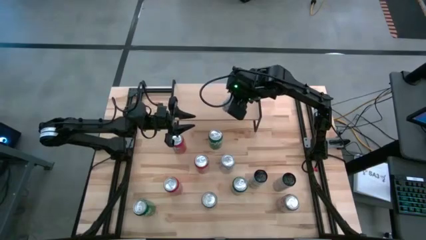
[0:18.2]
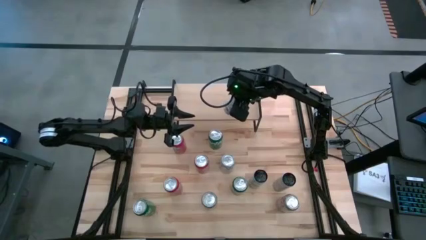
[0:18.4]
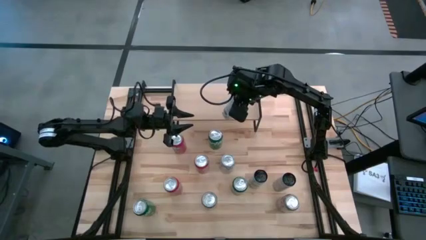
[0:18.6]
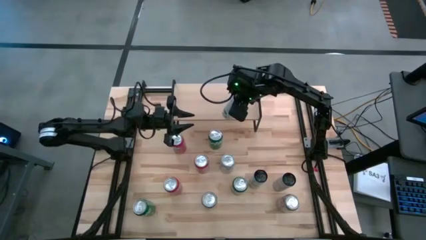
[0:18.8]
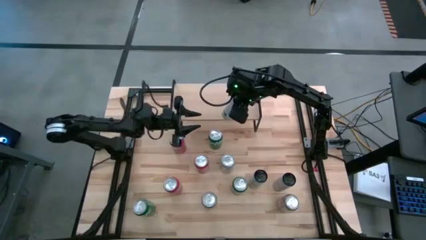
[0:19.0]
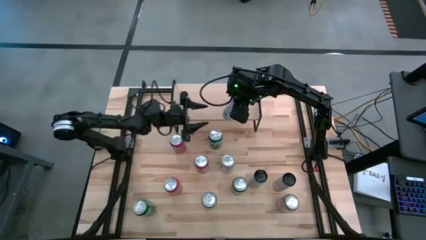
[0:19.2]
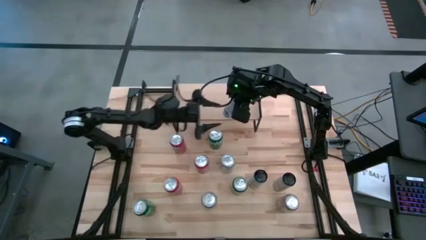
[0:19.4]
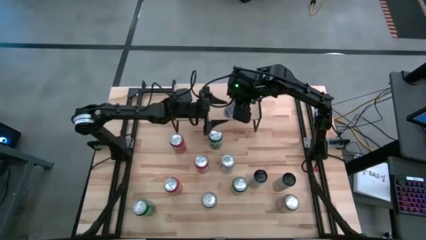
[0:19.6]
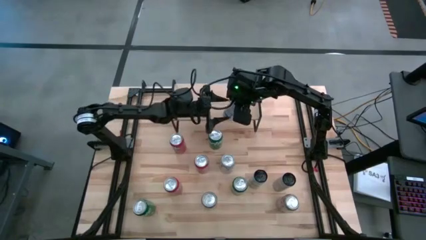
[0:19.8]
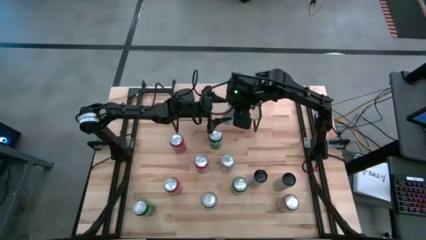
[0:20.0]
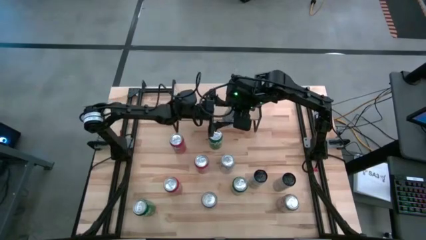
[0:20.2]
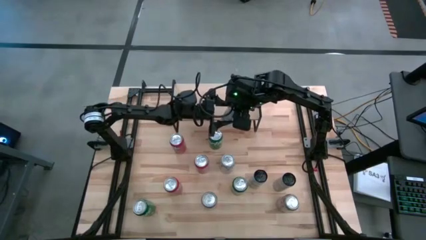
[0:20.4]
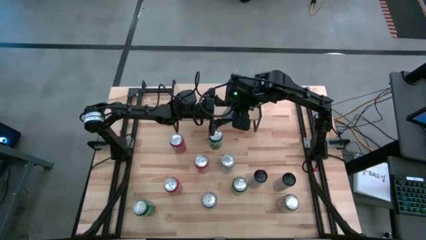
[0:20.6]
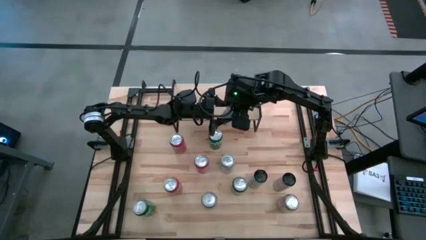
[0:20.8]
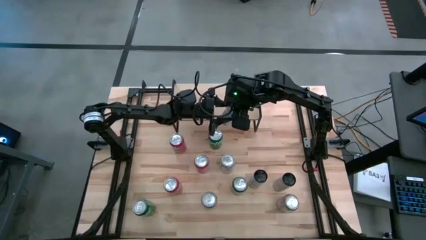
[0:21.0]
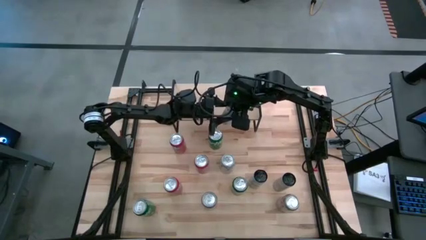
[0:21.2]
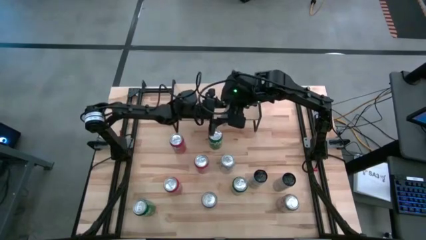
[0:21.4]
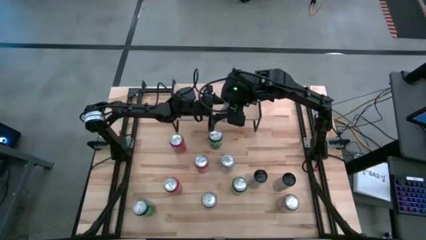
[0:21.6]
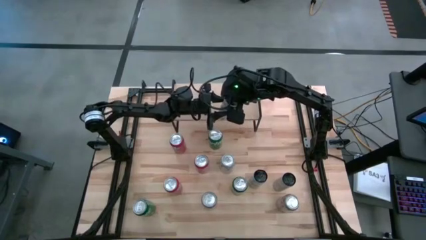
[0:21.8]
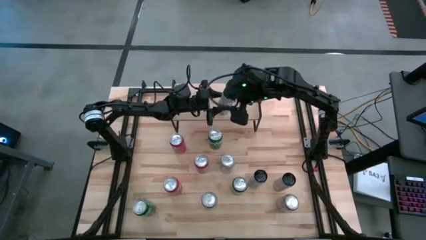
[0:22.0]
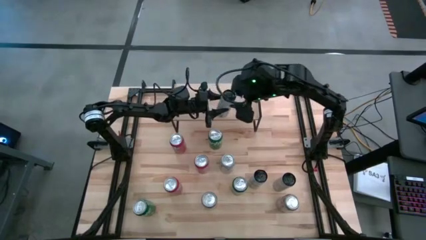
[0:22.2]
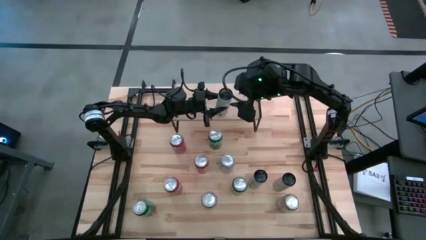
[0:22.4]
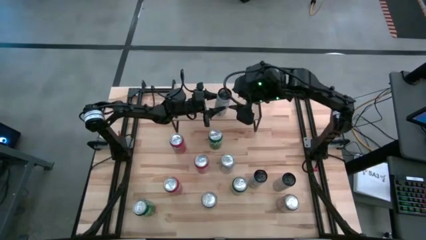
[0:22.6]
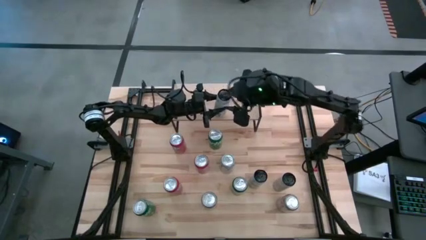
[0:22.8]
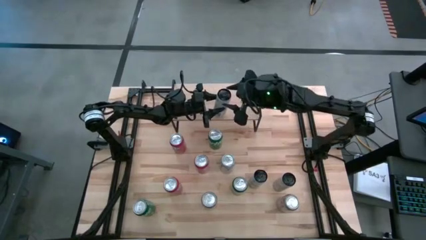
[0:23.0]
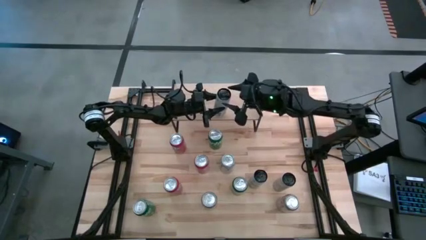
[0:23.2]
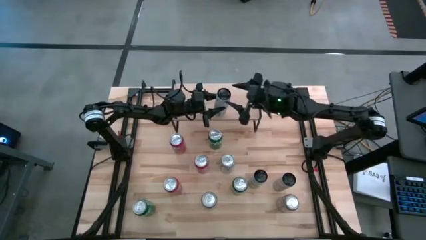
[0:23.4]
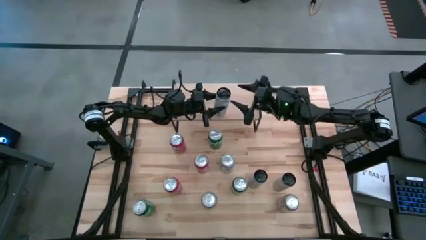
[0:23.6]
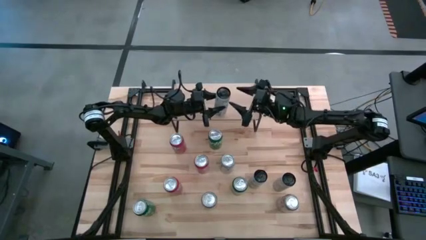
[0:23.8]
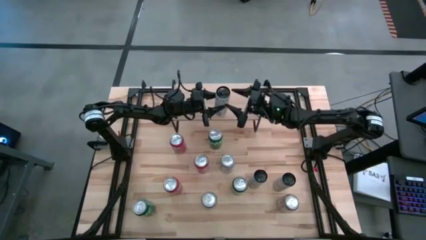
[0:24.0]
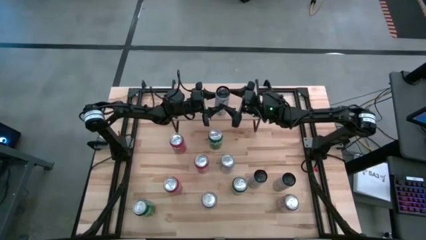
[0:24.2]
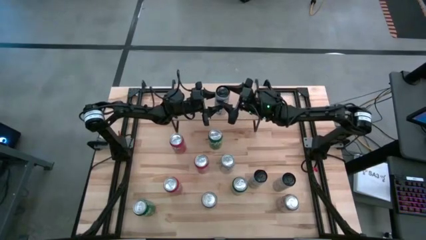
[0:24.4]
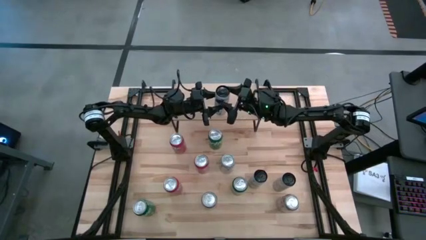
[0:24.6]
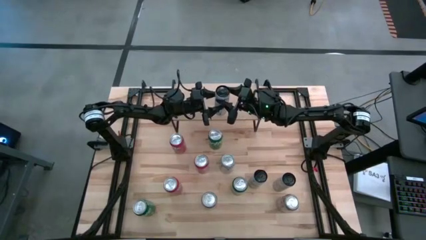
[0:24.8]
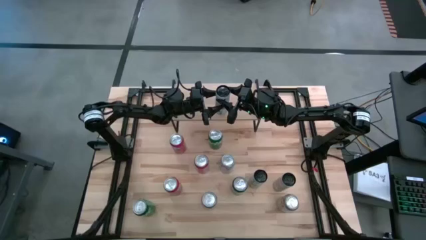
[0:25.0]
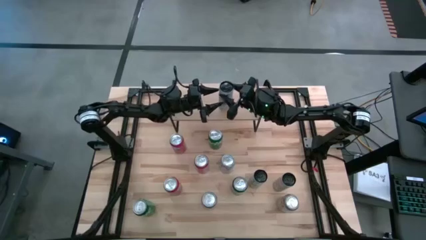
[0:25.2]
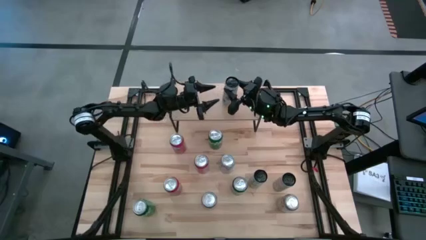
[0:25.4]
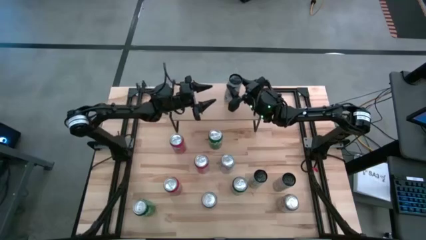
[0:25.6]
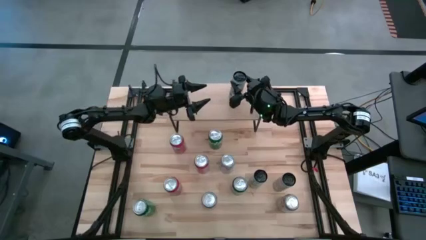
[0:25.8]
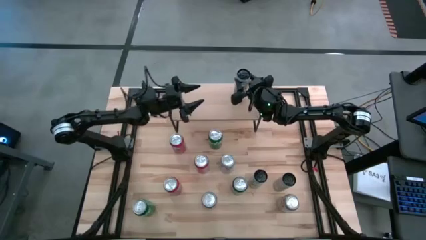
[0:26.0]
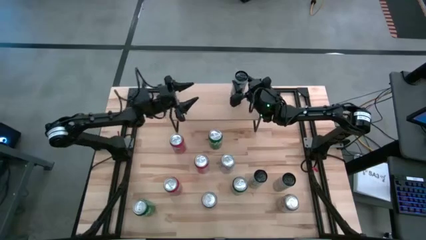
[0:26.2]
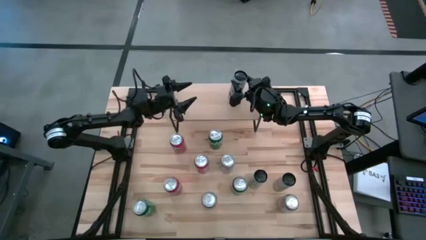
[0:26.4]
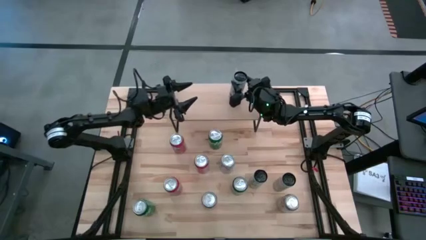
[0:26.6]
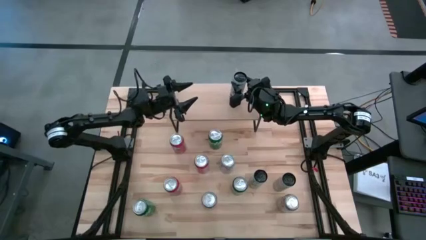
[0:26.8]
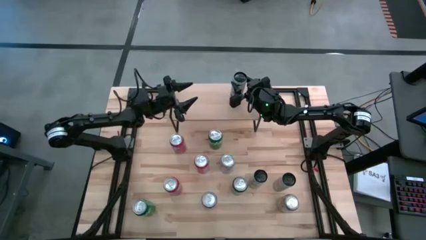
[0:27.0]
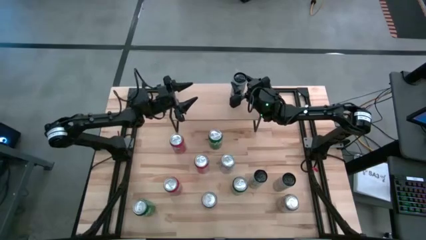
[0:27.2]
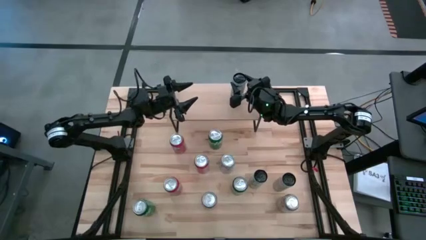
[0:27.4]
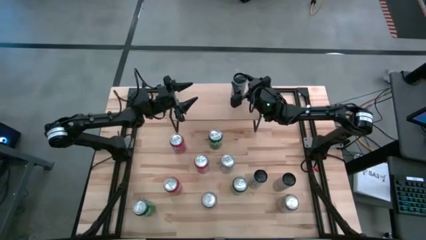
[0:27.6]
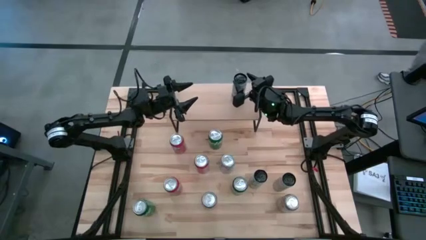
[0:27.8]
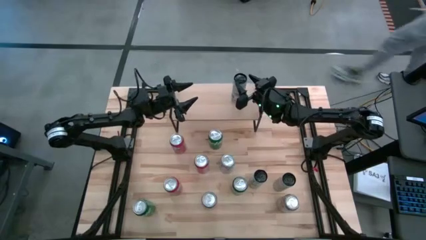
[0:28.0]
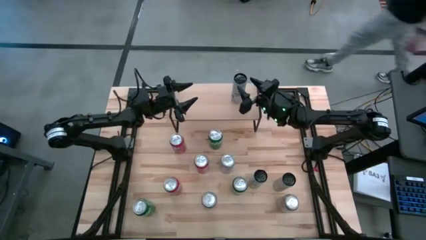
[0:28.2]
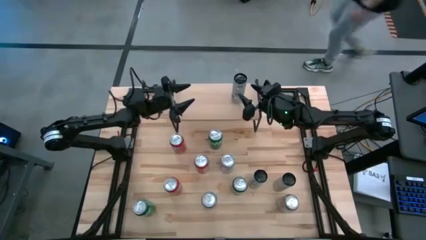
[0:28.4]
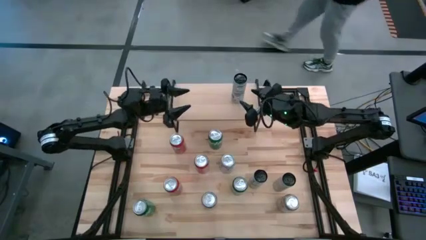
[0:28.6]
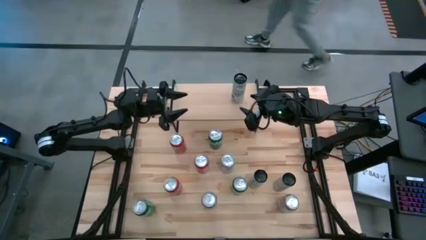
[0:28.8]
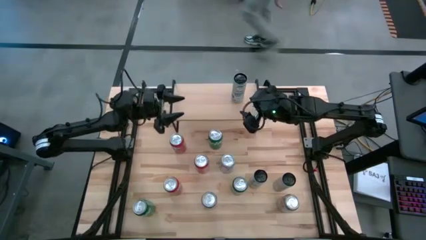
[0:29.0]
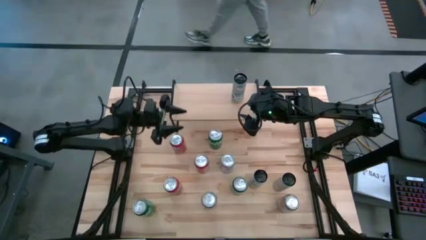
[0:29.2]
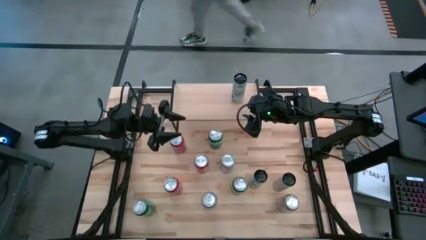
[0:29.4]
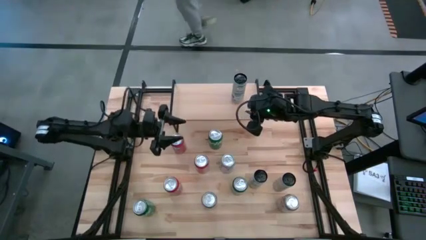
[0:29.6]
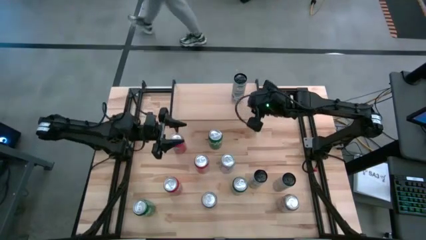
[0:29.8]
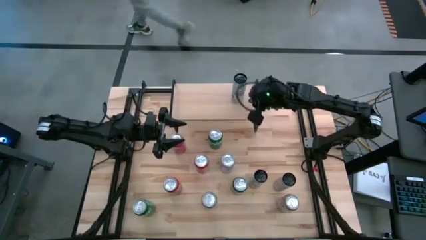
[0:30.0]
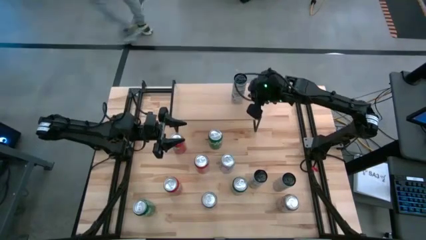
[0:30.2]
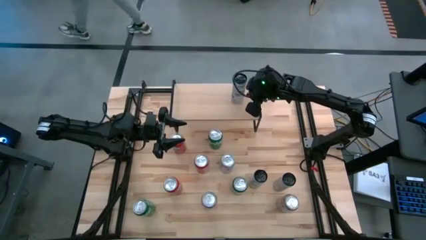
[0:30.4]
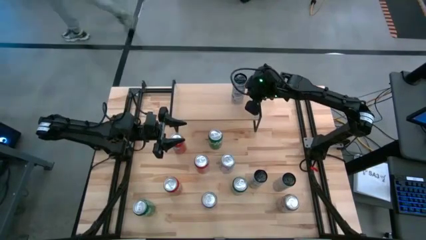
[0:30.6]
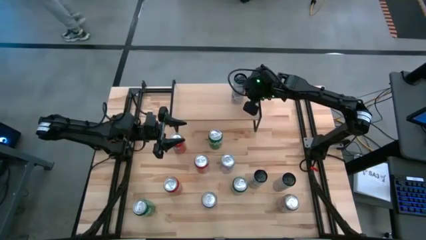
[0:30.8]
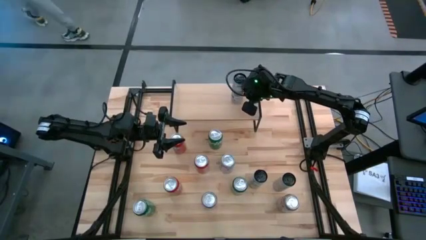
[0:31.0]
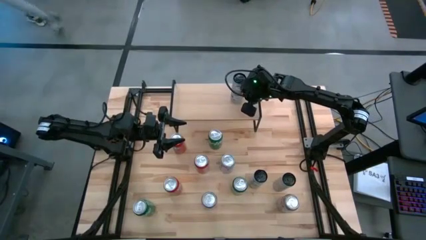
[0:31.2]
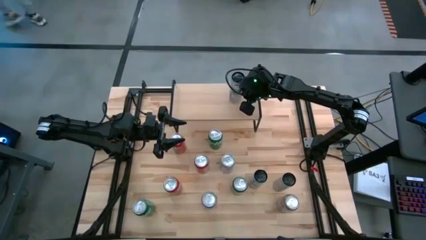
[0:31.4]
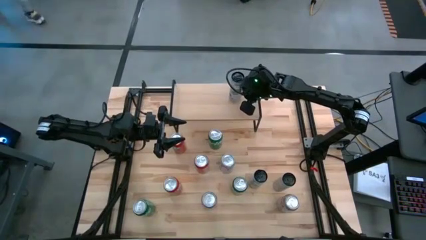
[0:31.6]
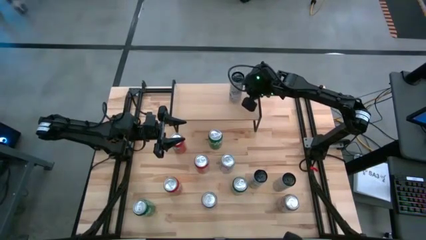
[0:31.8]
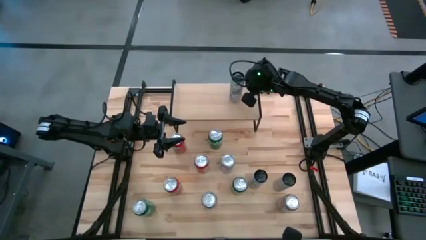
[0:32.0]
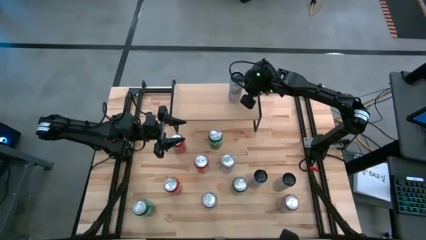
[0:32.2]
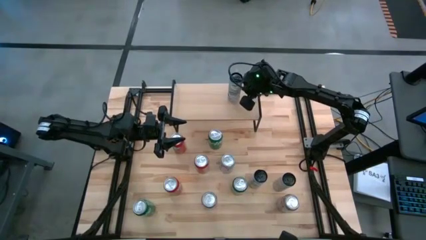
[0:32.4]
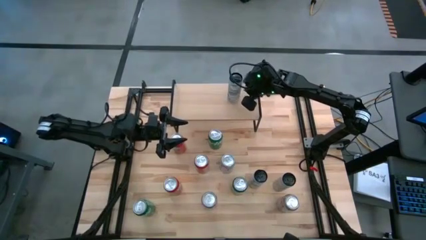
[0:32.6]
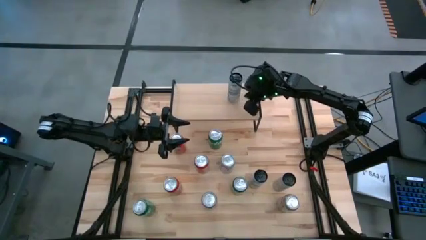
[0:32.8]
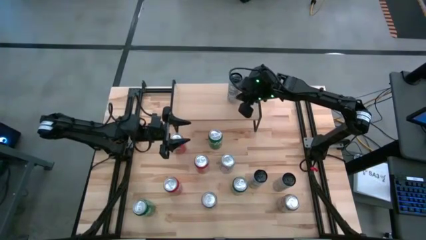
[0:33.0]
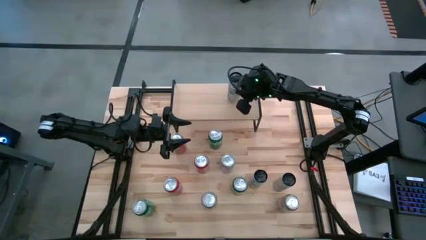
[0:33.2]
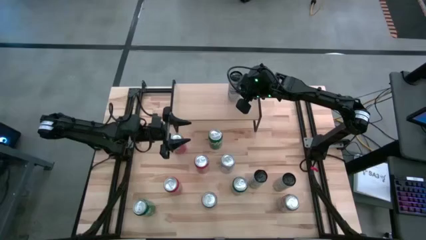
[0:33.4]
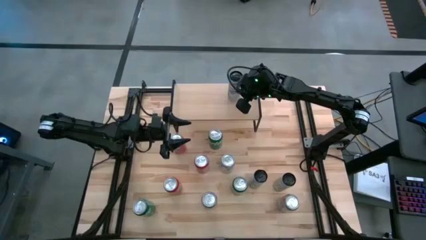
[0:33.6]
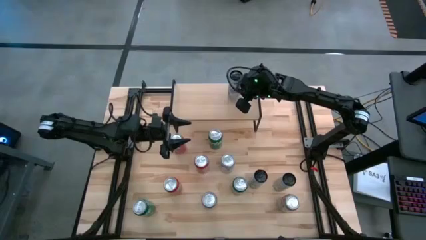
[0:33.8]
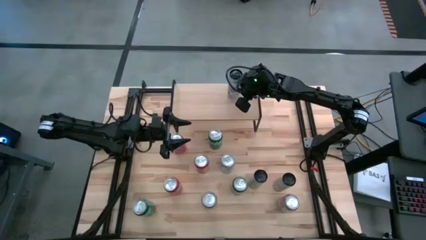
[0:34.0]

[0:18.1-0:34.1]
Task: Place canned beverage on shelf
Put the top white-blue soda can on the shelf
